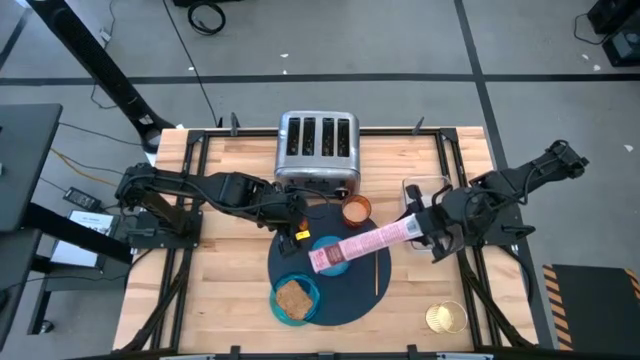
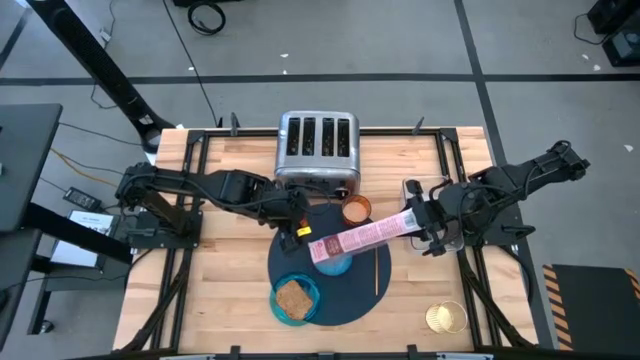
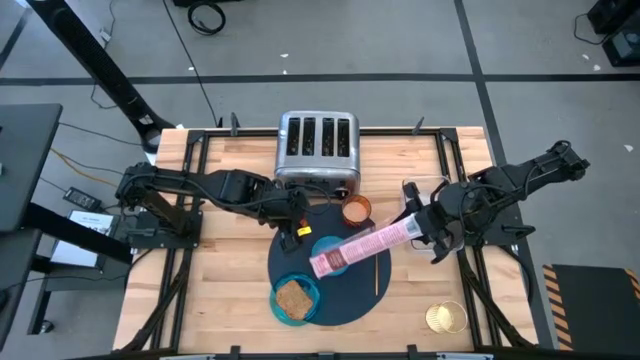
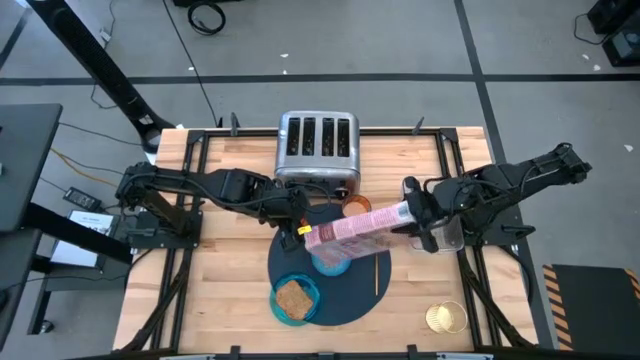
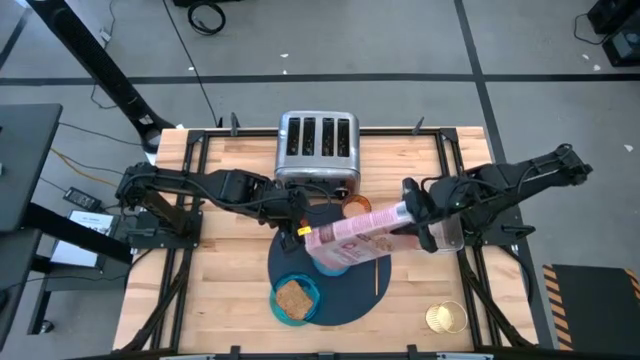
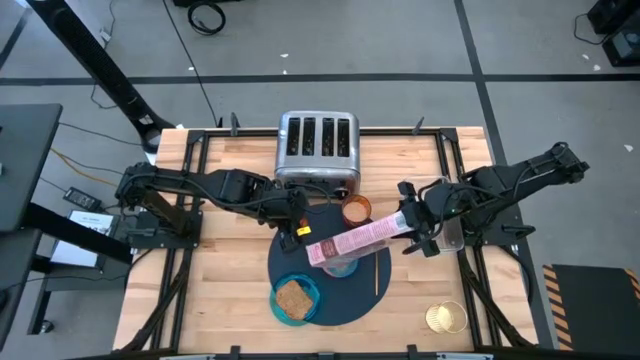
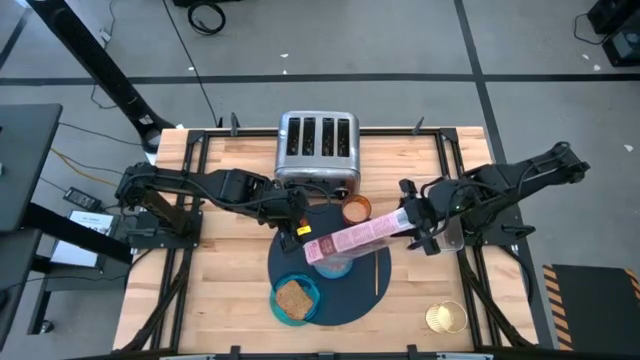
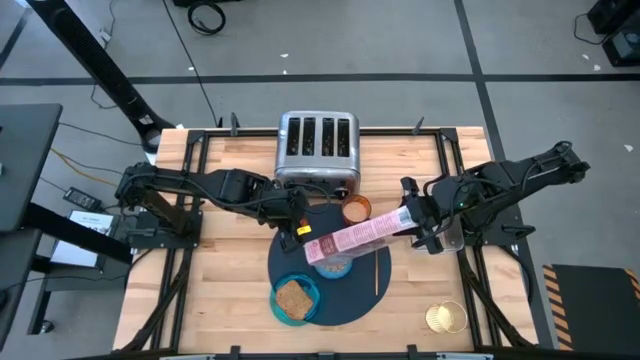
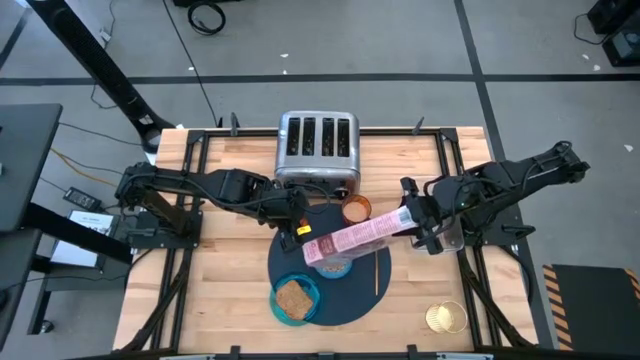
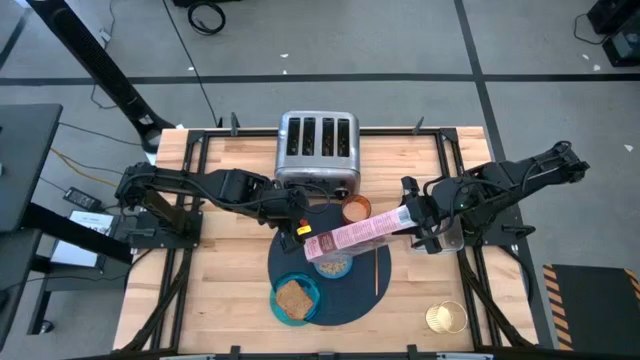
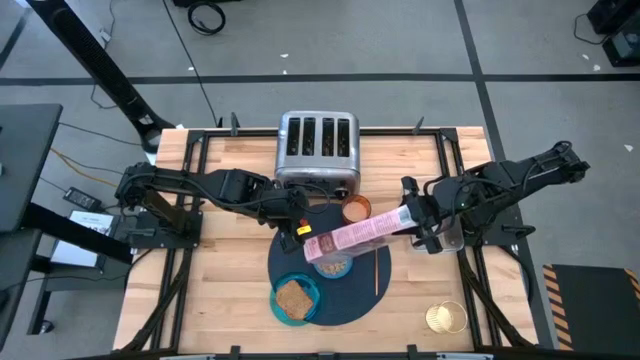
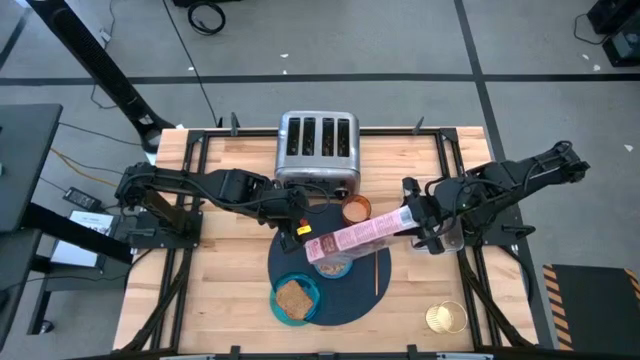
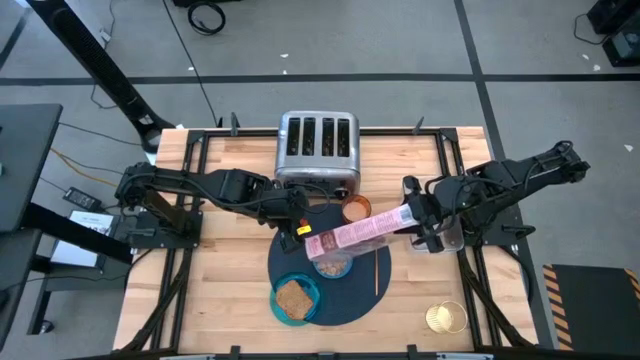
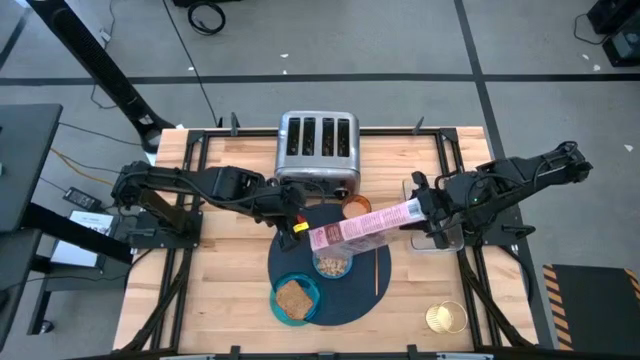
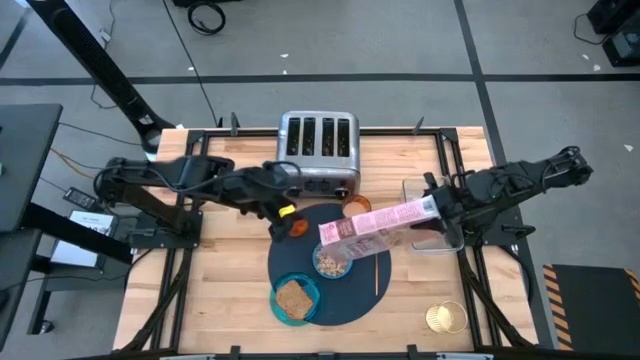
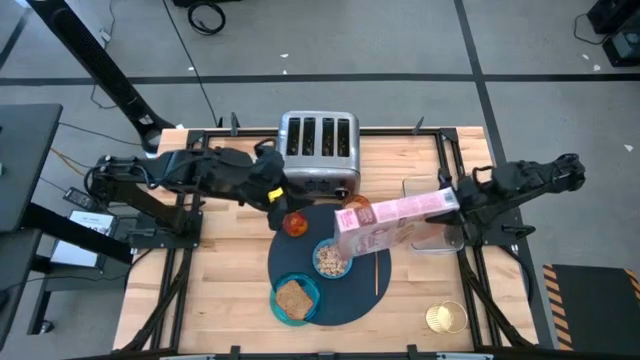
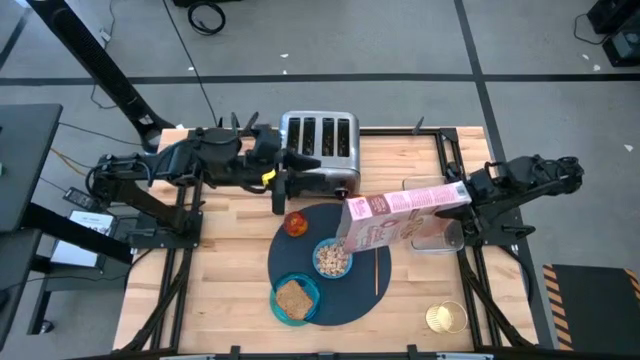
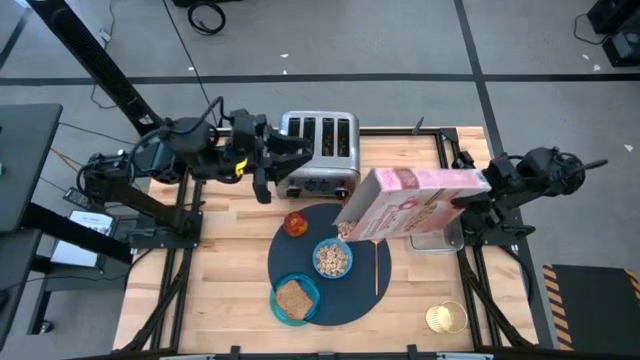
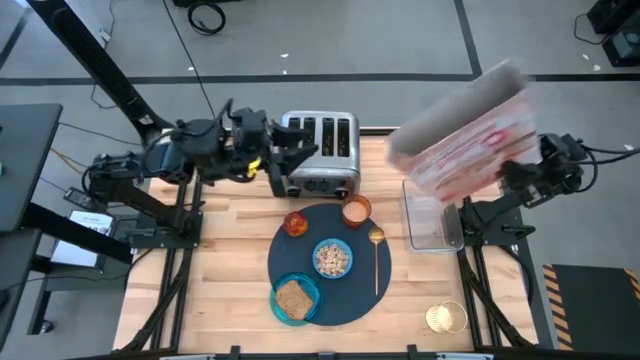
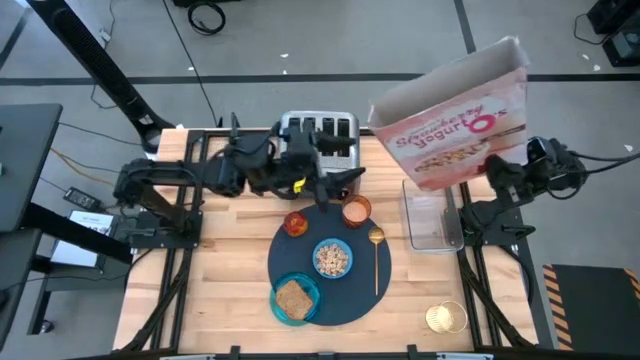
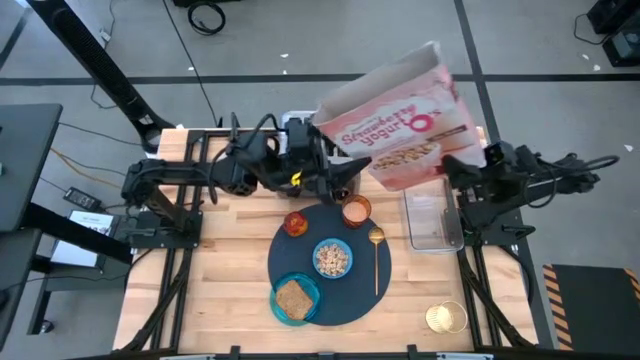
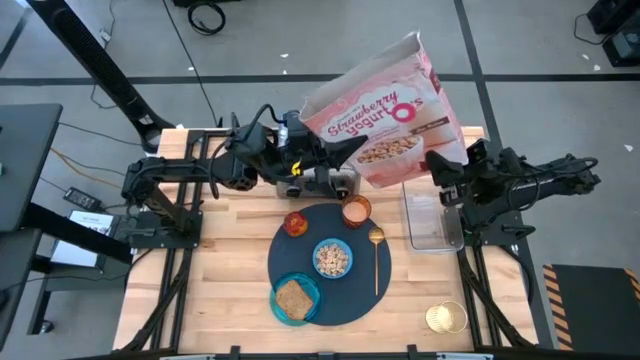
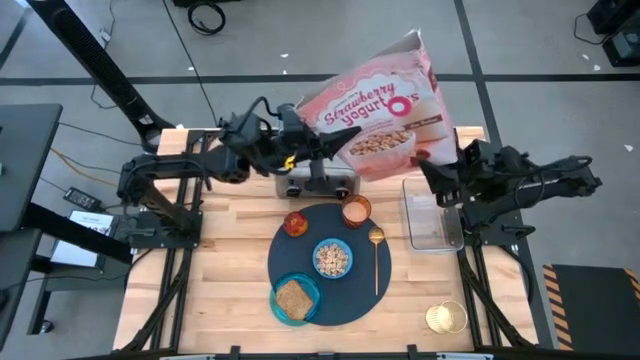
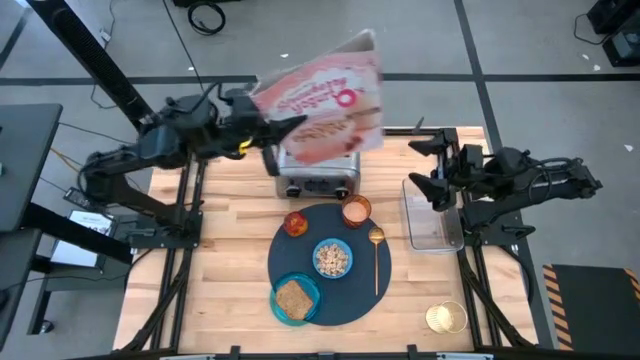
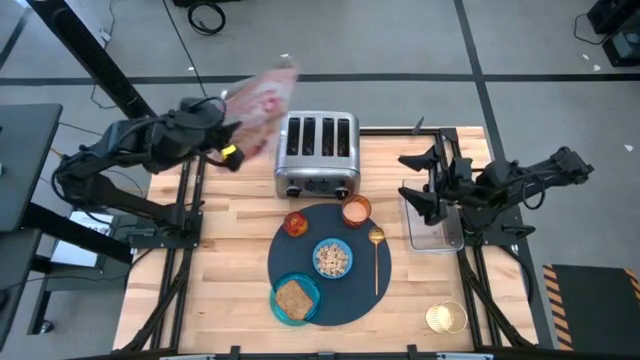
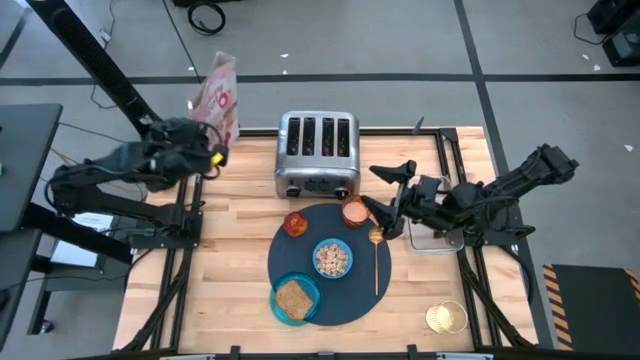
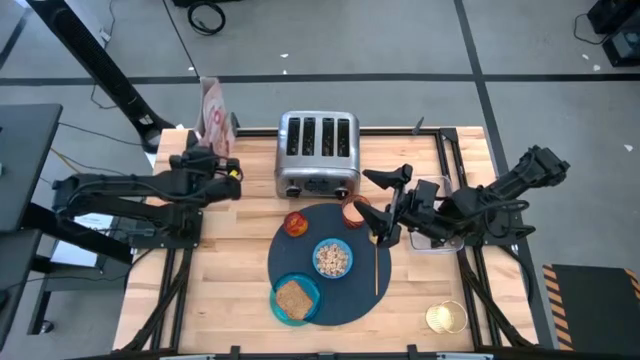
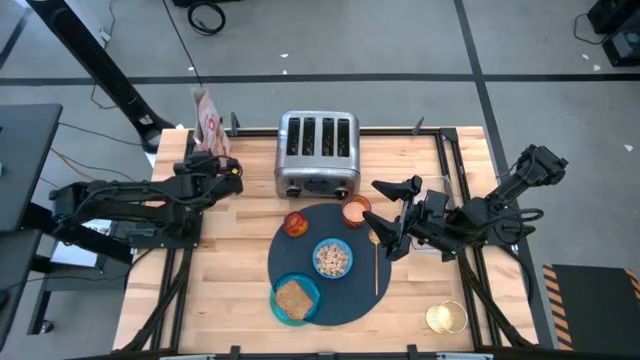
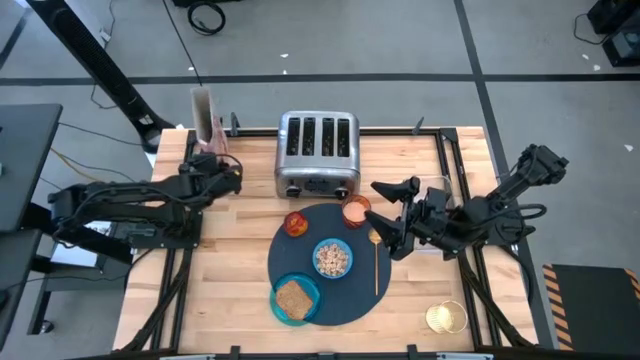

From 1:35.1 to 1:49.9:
Task: Arrange a breakfast setting
Pour the cereal into the orange and blue bowl

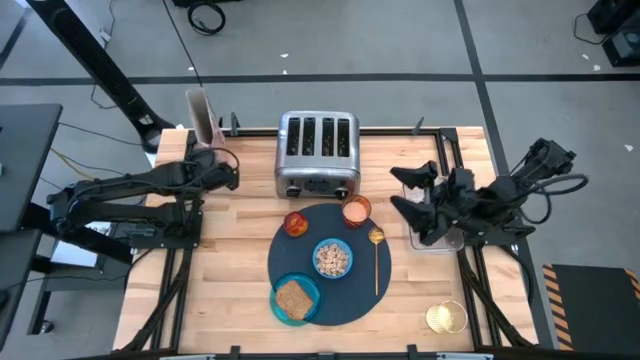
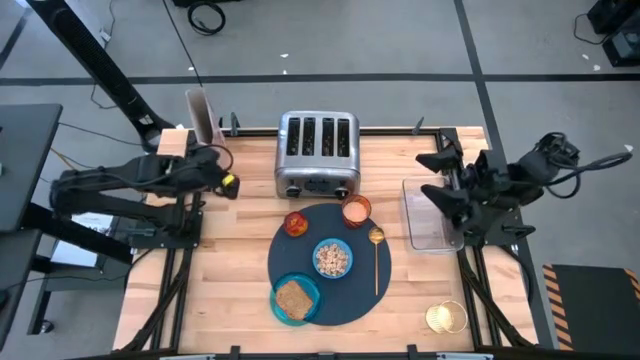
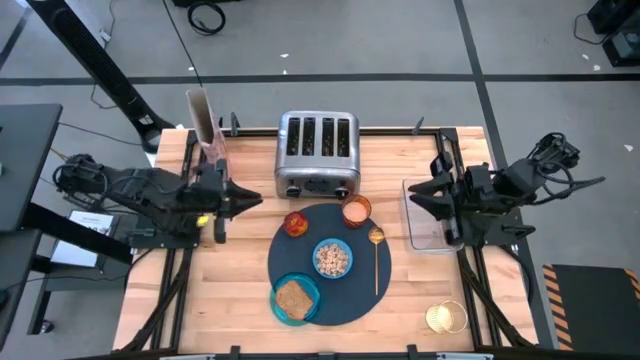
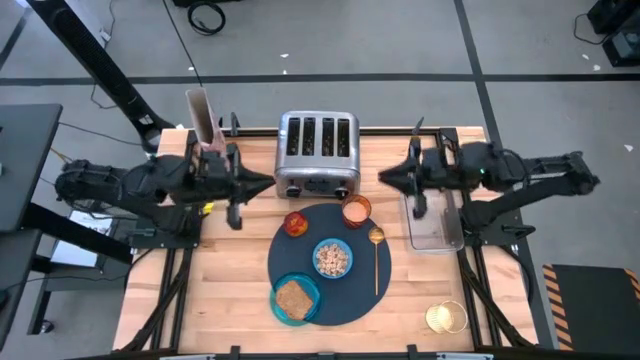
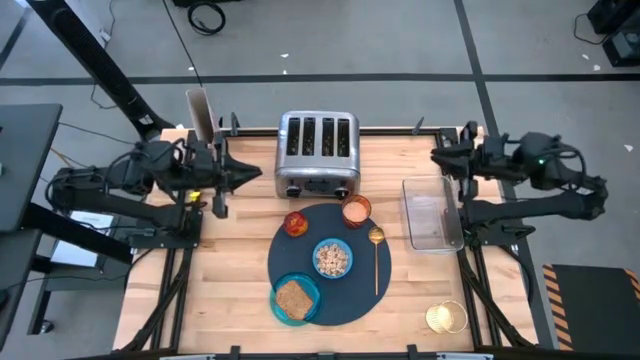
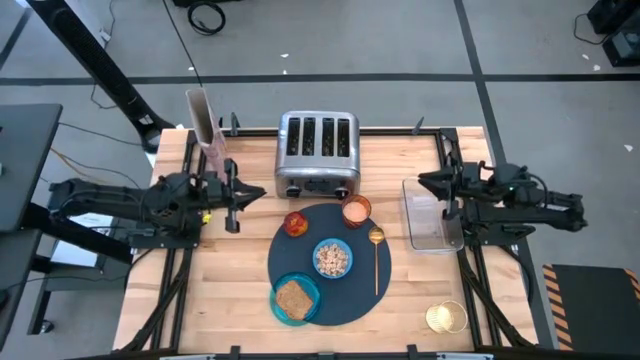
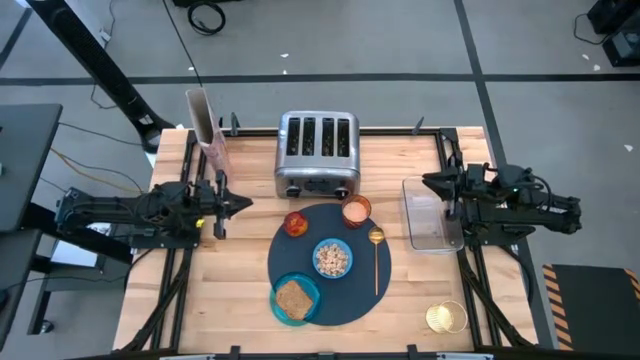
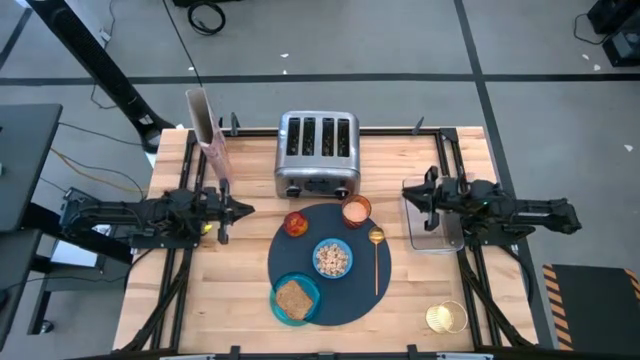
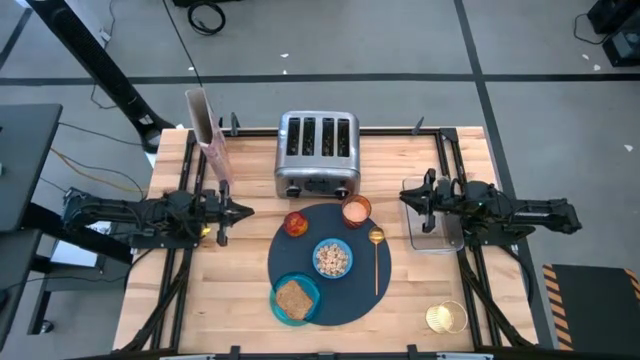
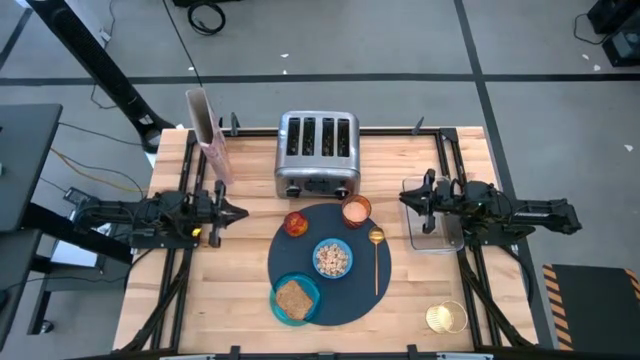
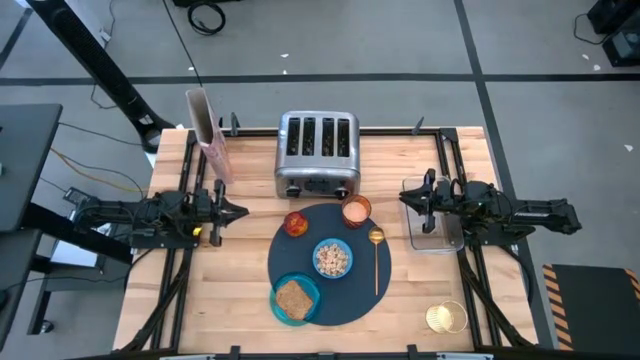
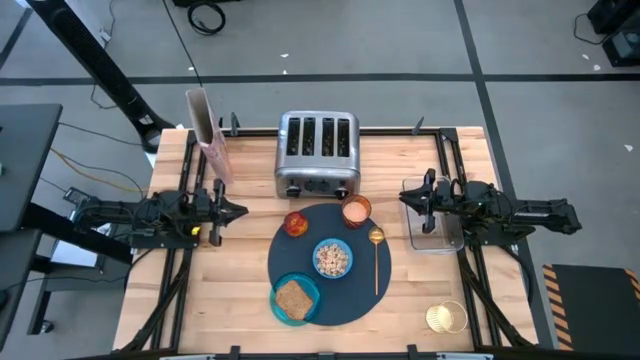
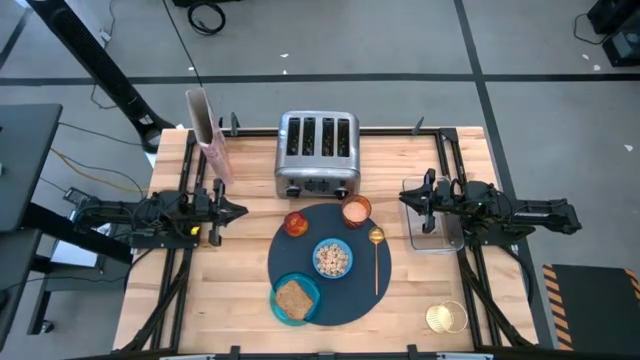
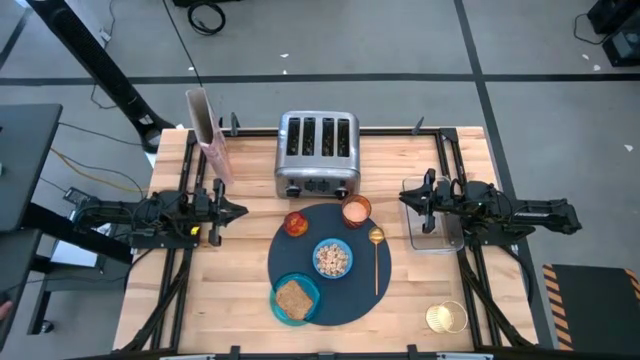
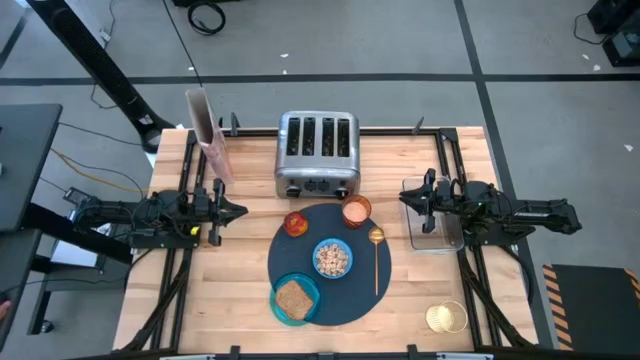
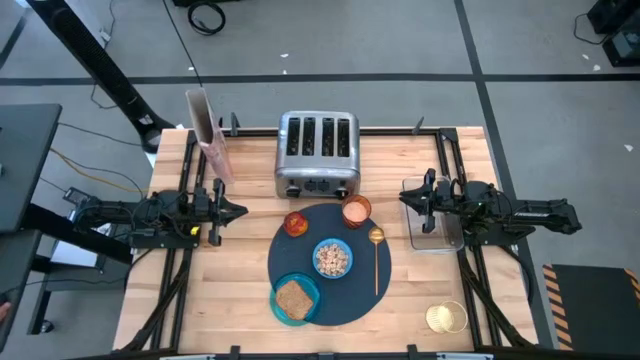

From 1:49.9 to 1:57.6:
Return to Home Position
